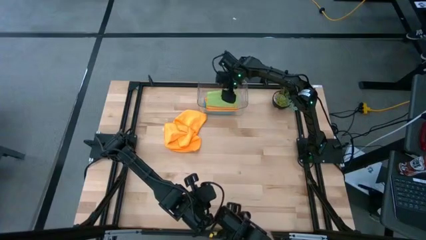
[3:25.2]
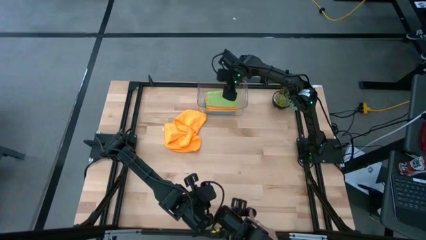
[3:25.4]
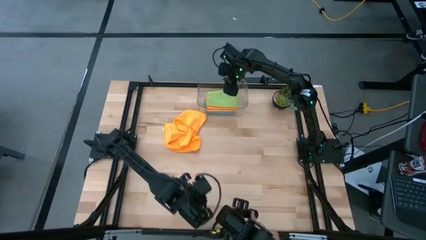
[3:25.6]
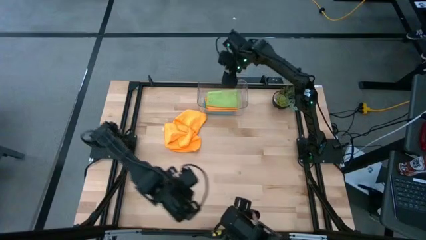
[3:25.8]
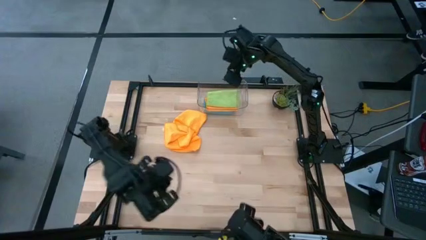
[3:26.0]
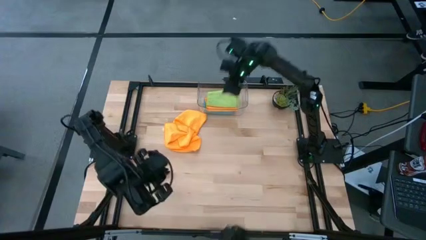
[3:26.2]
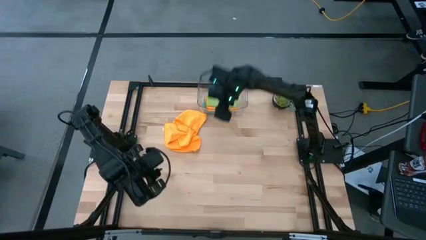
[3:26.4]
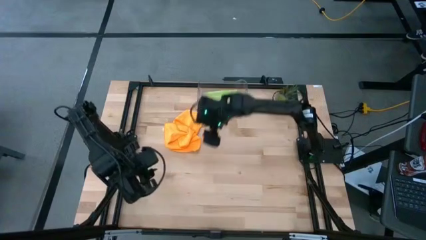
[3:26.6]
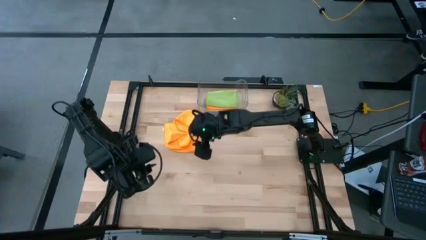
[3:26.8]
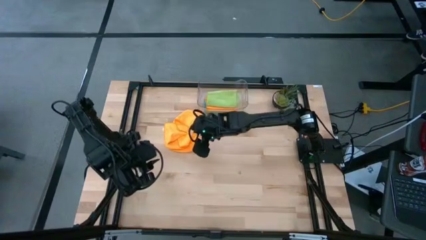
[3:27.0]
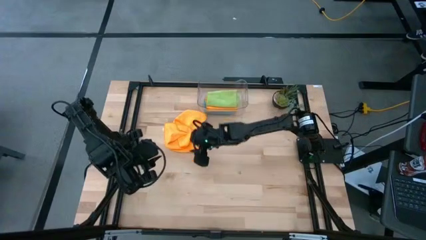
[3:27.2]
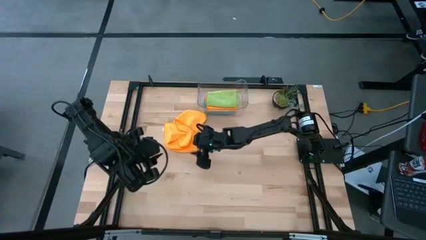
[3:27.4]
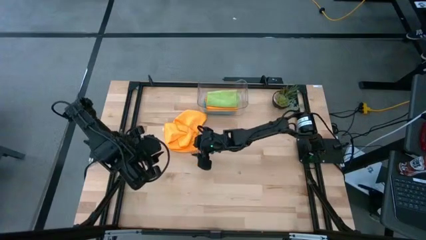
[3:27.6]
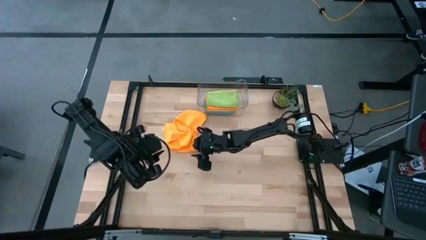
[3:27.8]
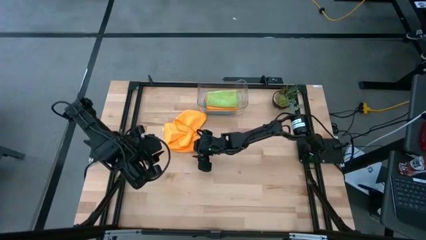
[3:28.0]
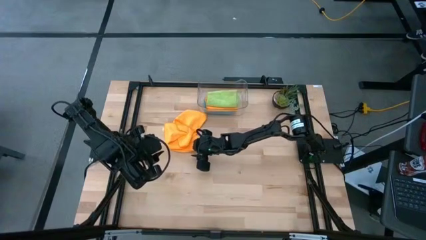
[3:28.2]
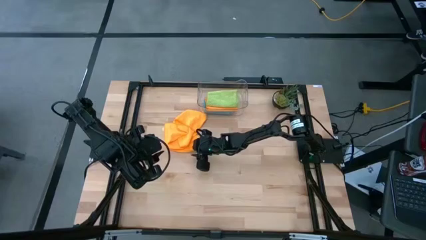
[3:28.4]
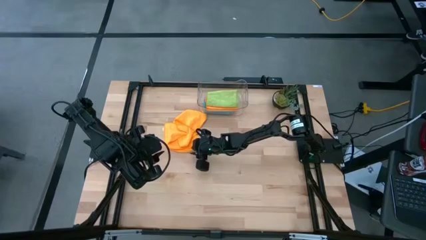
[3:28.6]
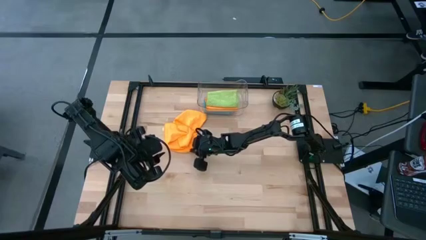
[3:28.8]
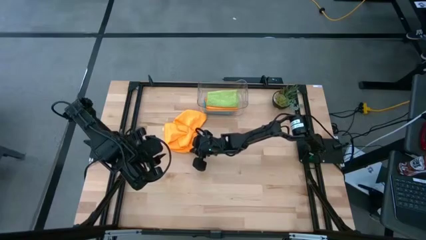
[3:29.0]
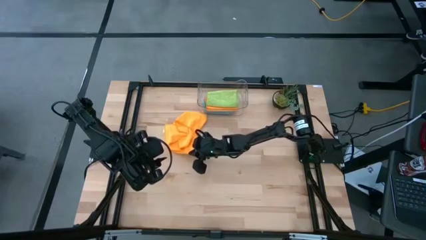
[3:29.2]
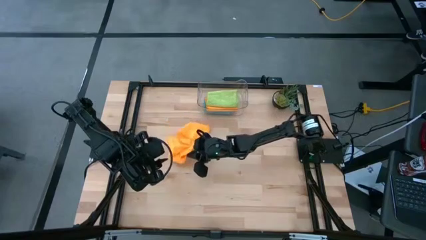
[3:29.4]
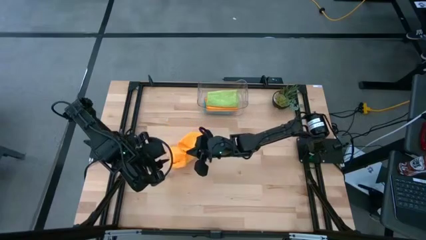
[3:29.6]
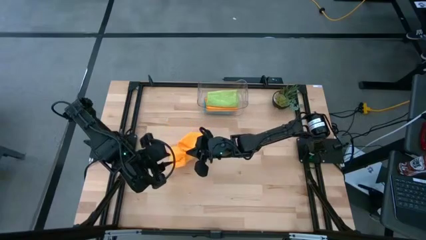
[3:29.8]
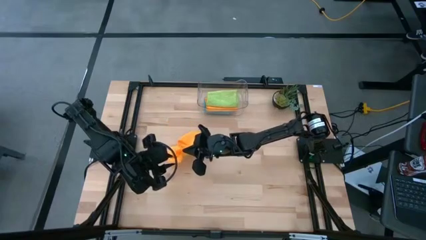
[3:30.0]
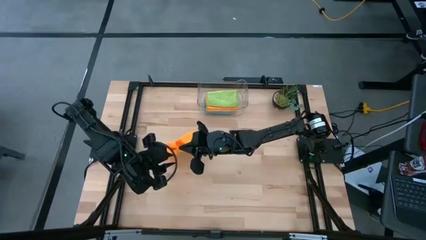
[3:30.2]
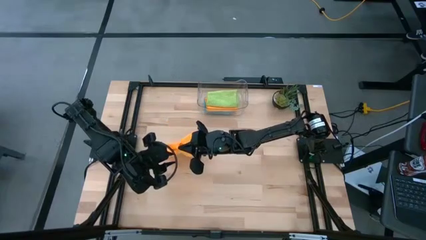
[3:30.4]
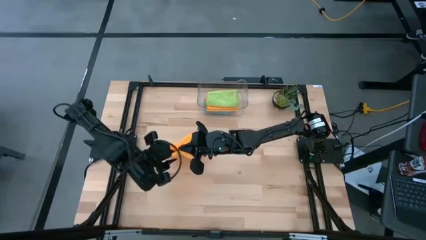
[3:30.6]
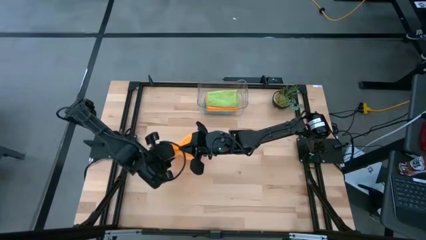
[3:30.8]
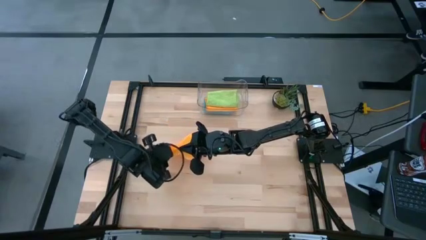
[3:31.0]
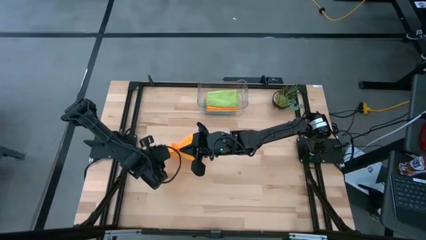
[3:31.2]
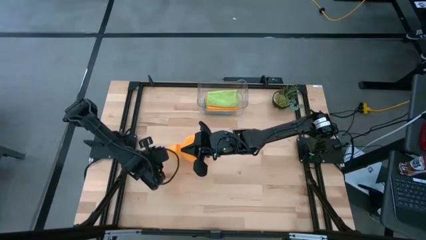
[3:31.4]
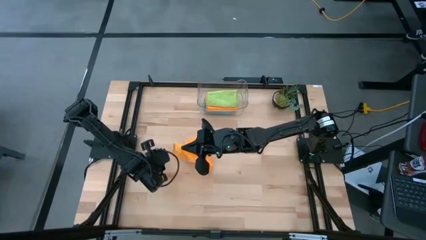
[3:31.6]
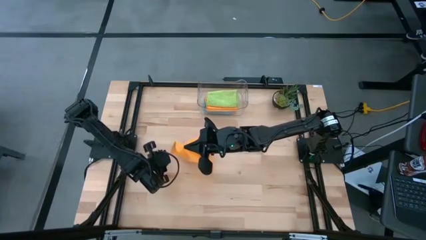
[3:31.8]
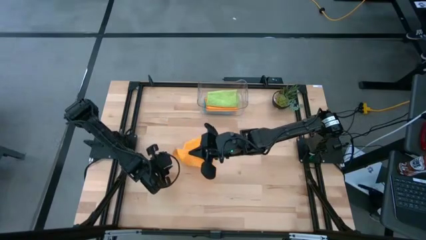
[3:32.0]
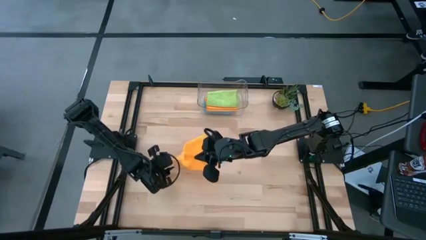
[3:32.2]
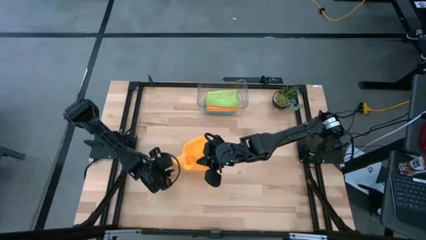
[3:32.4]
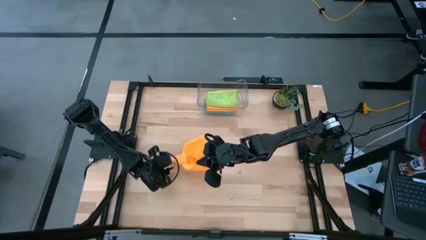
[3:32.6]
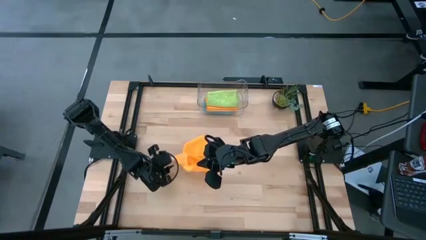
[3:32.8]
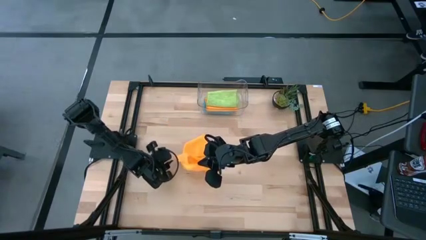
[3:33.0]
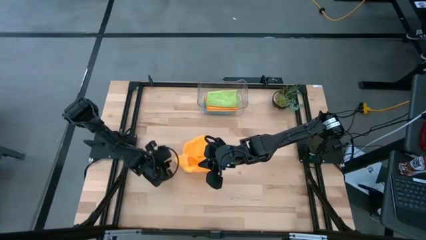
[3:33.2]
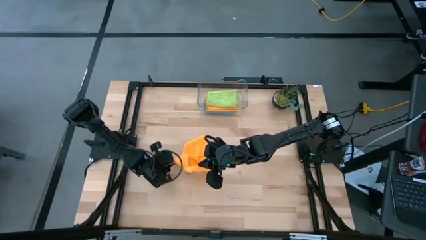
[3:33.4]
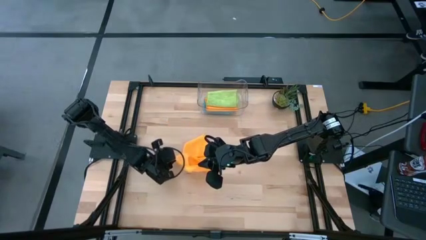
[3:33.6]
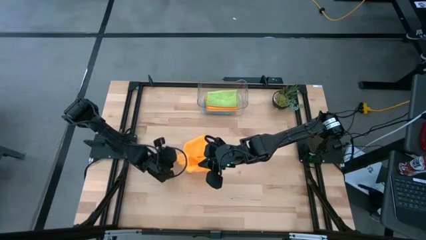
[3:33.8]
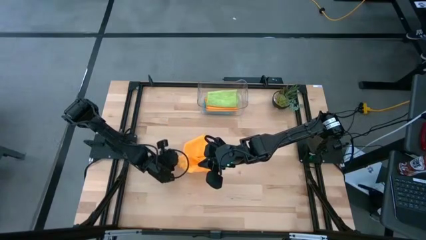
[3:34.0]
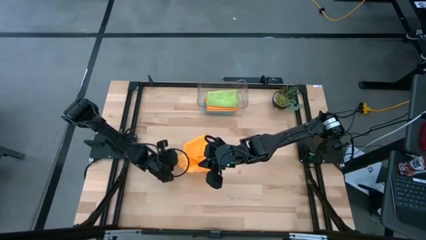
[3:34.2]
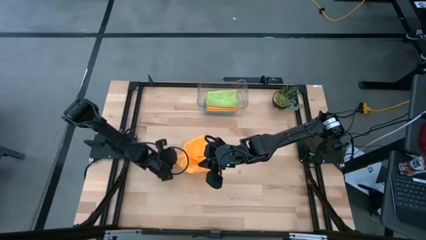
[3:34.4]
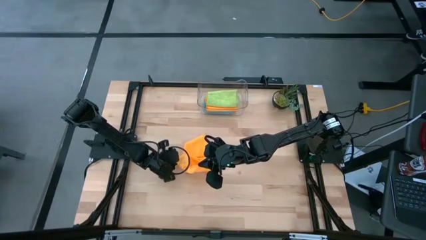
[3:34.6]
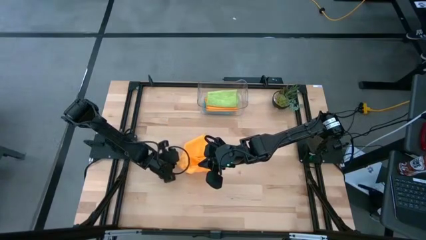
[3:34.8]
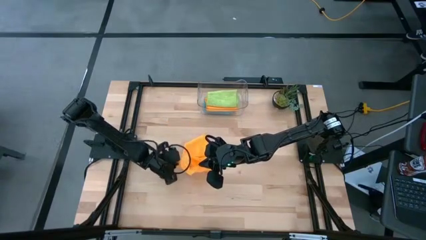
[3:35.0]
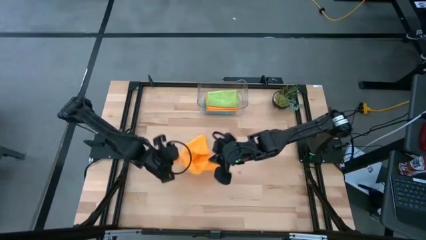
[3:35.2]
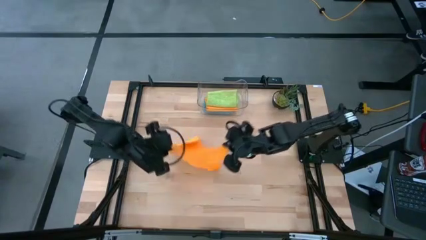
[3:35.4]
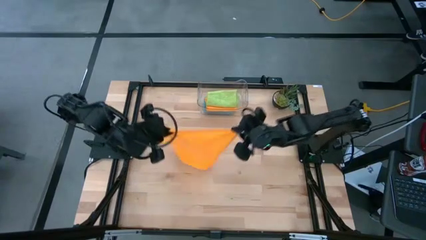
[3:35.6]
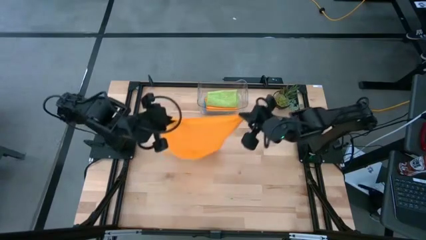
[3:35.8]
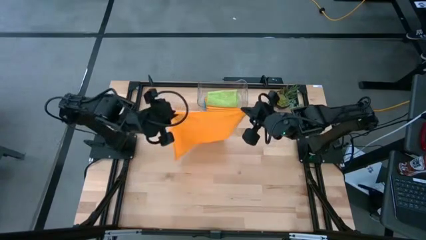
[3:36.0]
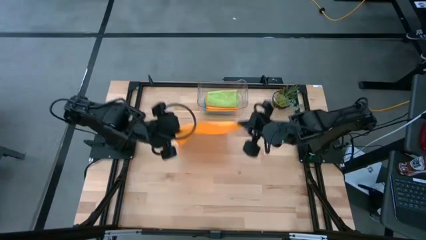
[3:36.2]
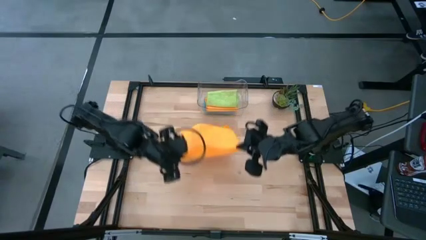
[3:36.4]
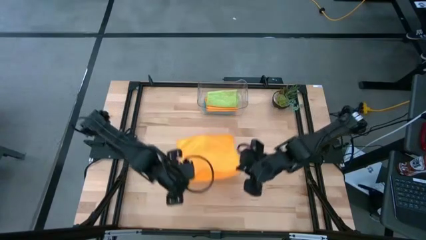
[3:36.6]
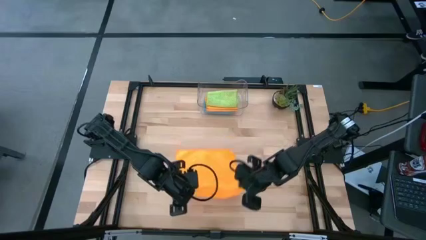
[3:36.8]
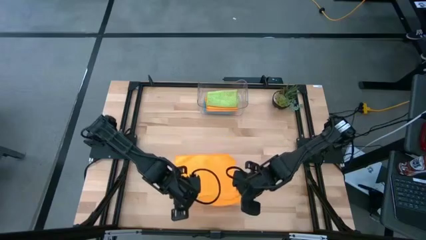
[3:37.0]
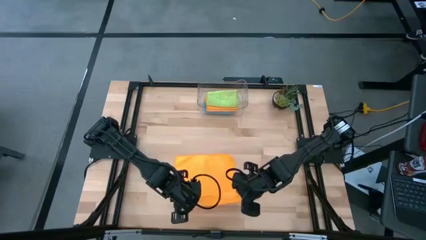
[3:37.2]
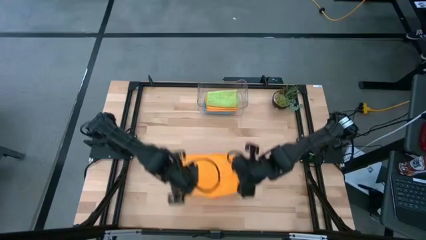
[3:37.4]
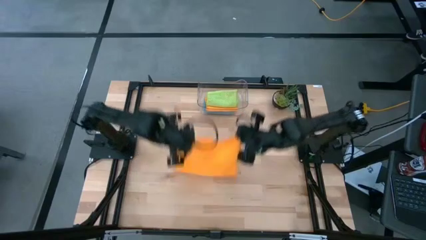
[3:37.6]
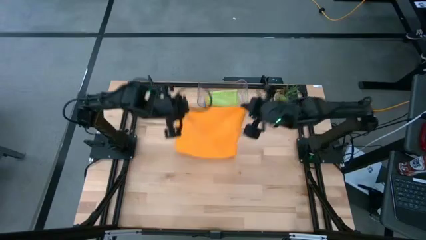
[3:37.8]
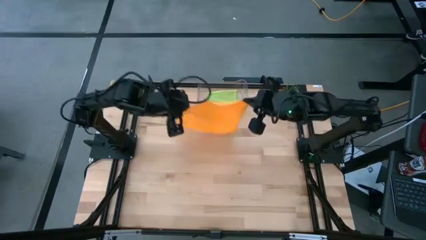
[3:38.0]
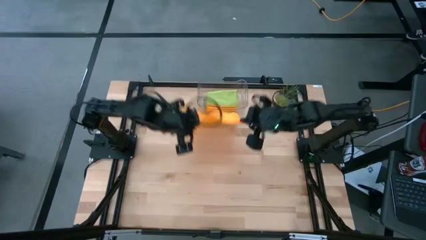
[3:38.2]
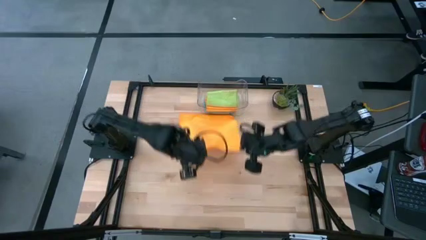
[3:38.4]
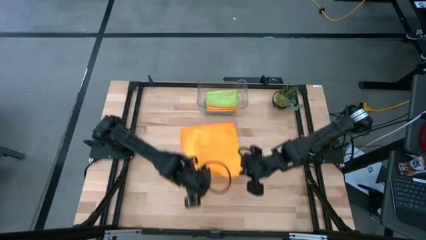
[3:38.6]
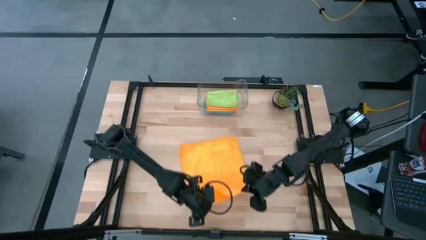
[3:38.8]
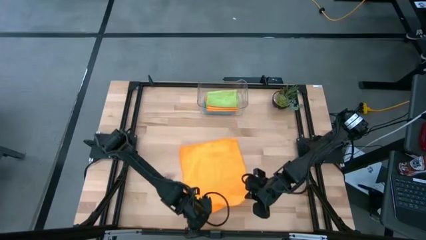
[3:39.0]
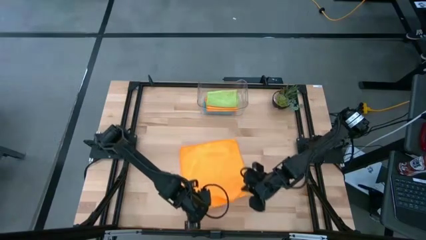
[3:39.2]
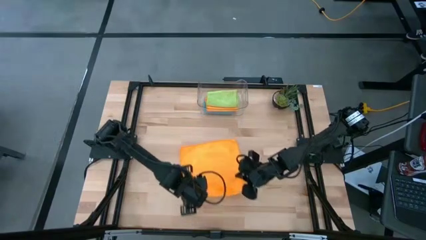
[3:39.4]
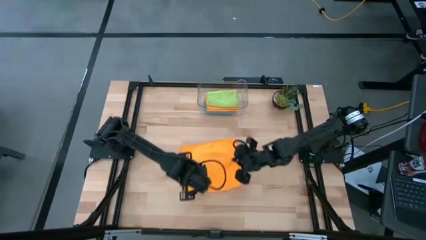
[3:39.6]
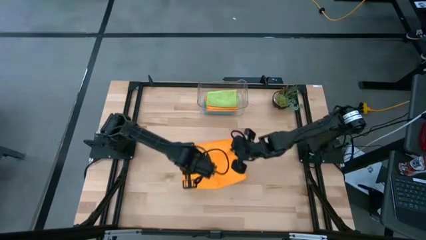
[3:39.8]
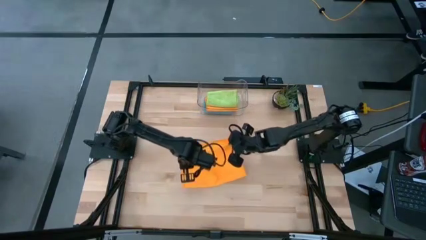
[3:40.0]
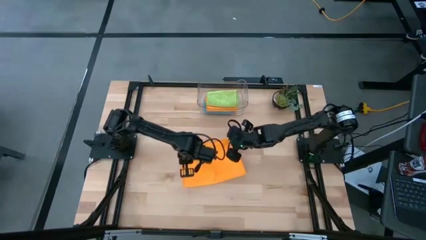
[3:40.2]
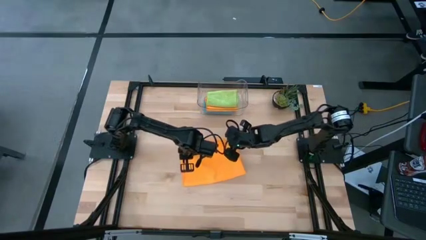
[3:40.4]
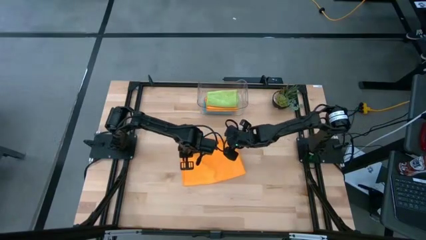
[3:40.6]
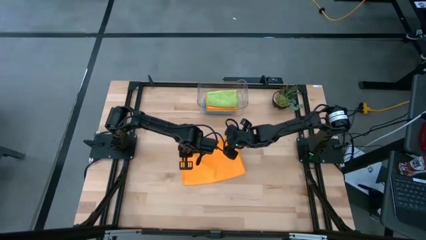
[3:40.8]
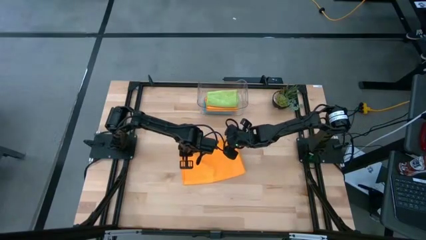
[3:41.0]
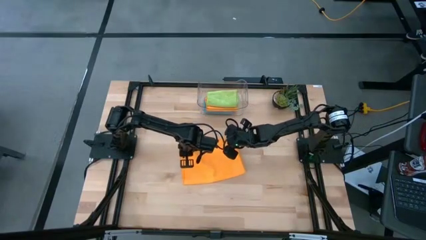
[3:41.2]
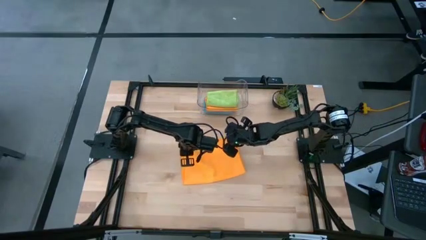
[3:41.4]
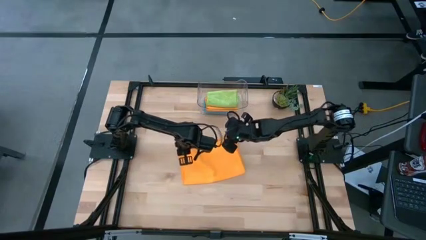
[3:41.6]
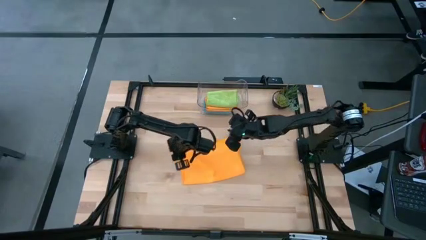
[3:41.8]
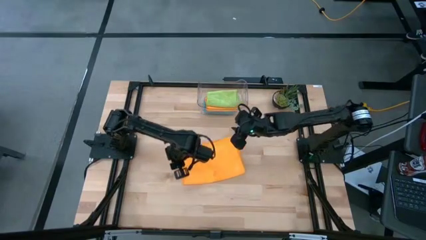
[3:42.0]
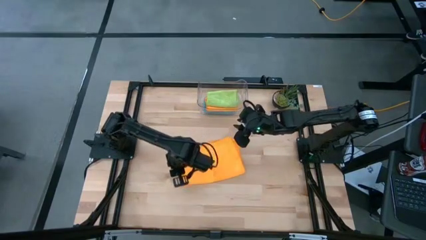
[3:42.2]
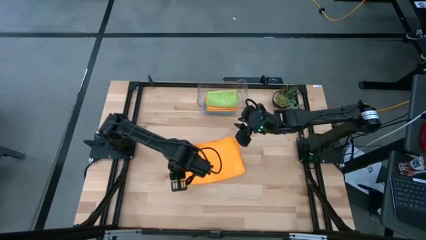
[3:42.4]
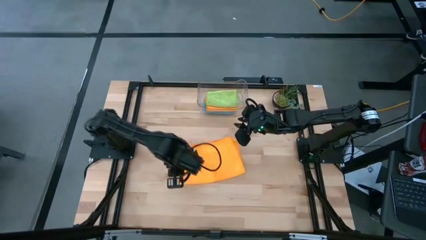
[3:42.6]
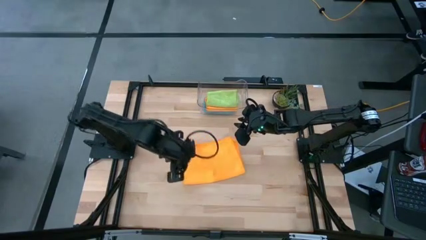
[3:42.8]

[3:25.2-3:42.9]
Task: Fold microfiber towels
Fold the orange microfiber cloth
